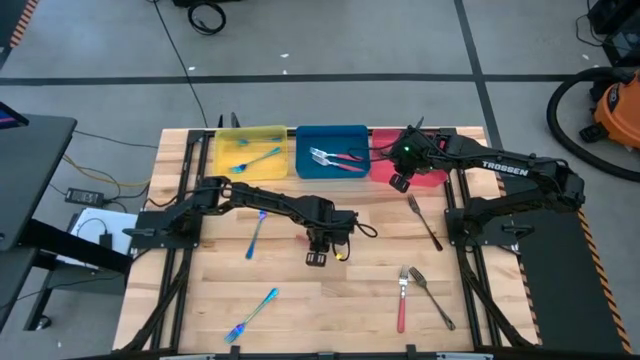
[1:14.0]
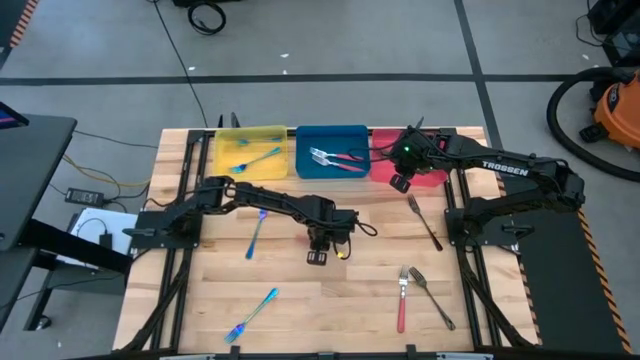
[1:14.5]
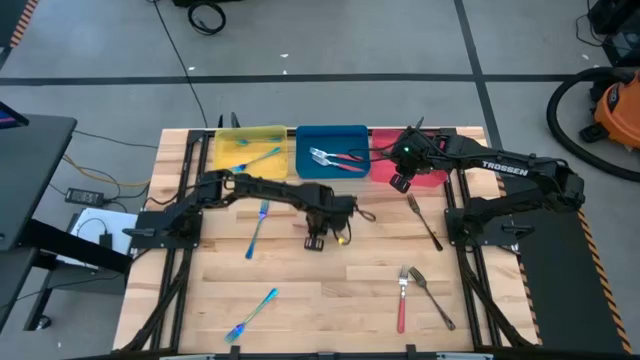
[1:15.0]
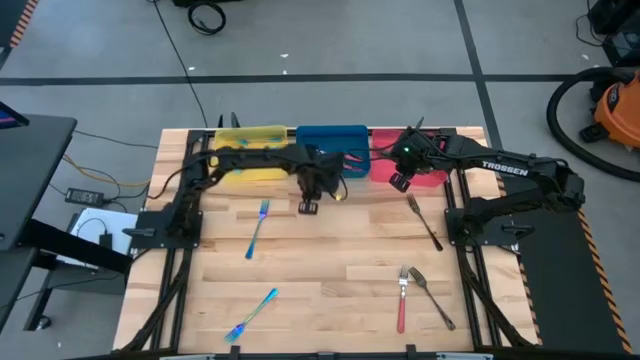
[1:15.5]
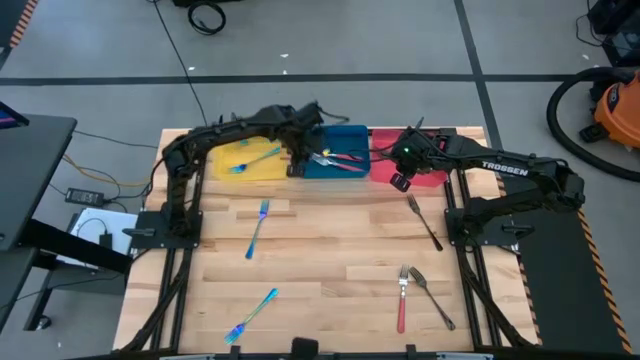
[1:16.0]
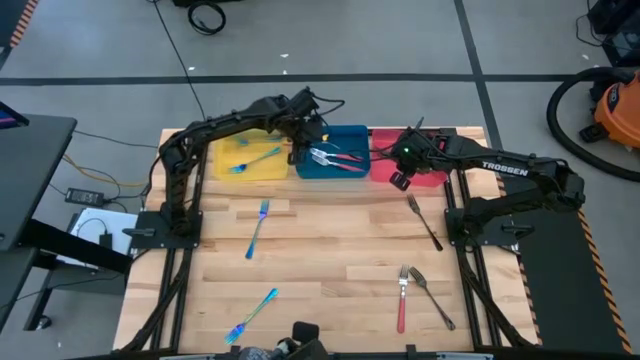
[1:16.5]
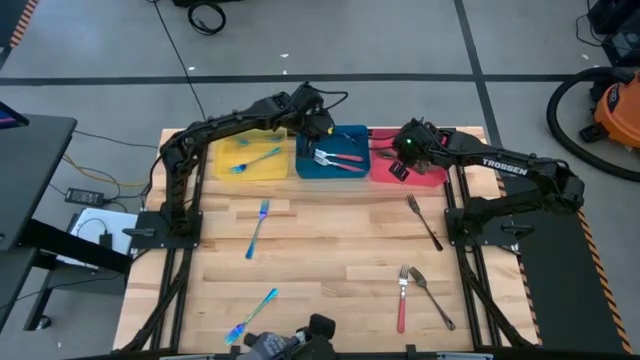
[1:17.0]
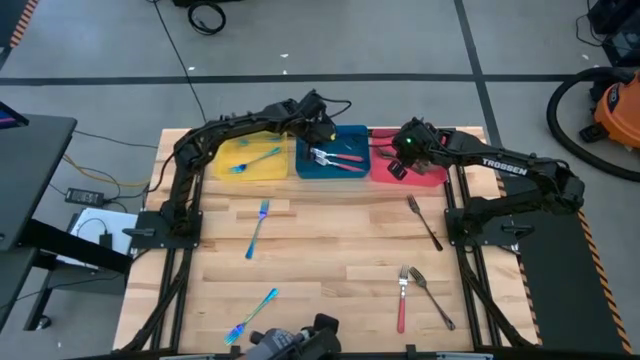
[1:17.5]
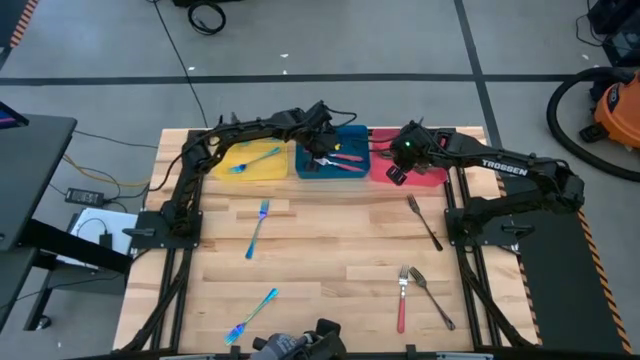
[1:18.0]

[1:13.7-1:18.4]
Task: Sort silverware by color (type)
Put the pink fork into the blue bin

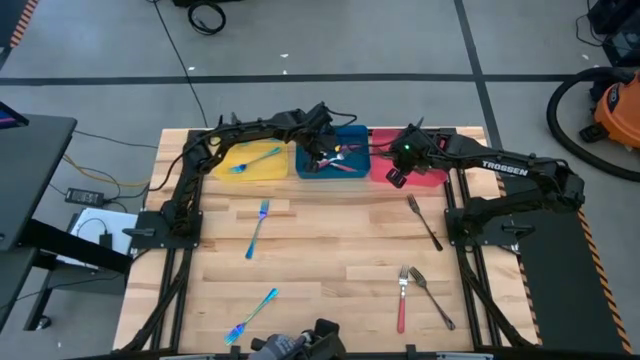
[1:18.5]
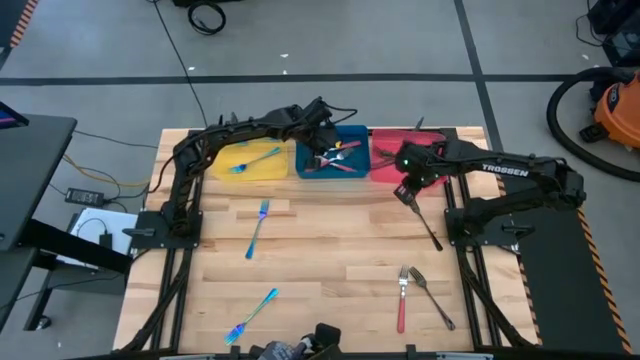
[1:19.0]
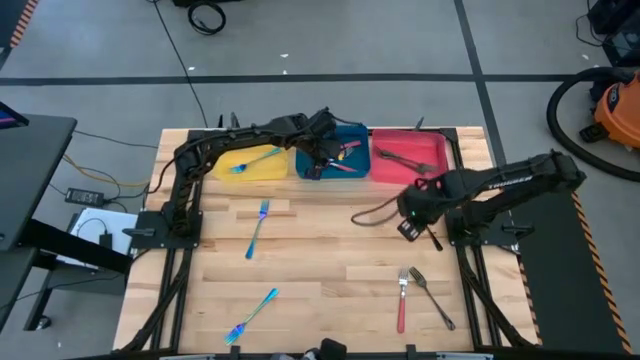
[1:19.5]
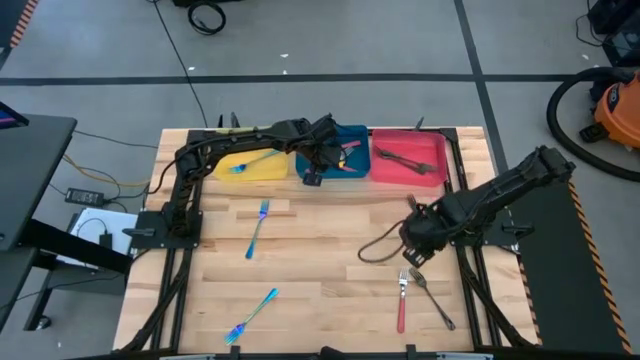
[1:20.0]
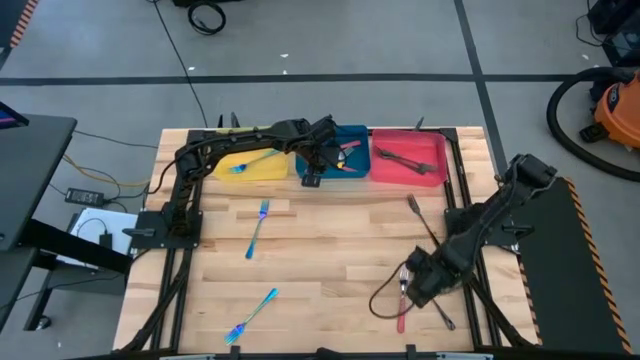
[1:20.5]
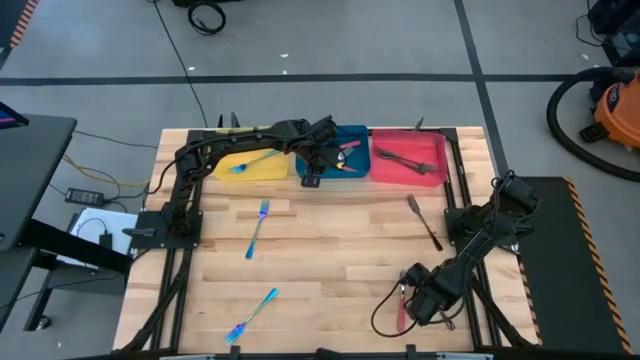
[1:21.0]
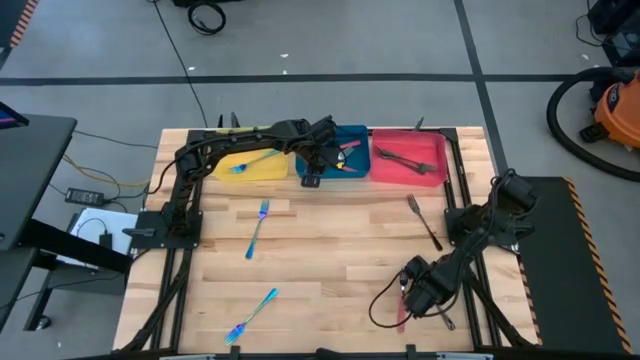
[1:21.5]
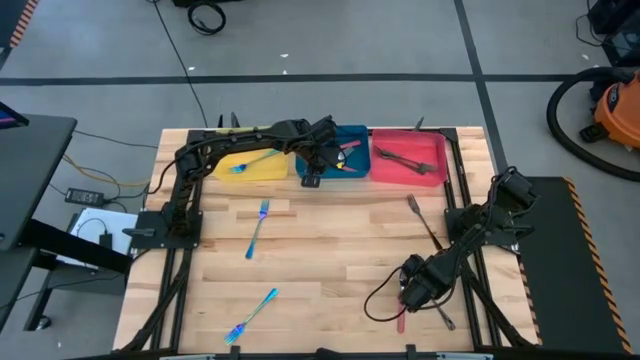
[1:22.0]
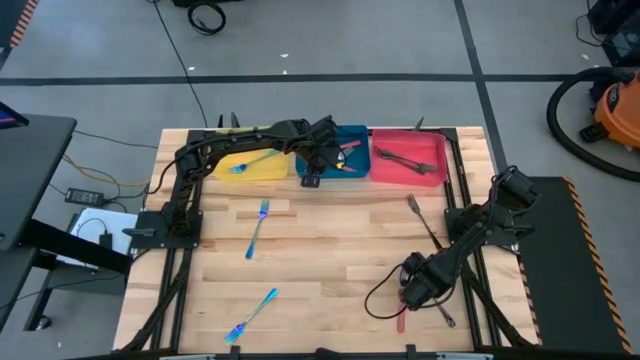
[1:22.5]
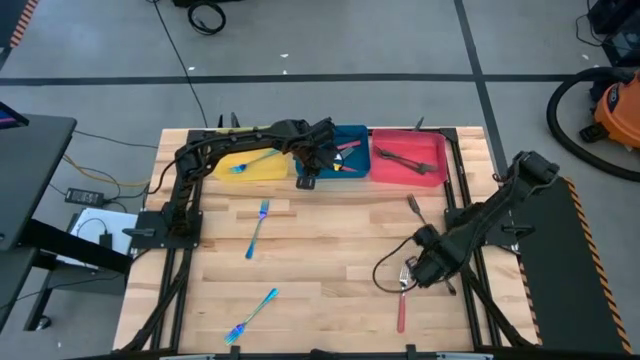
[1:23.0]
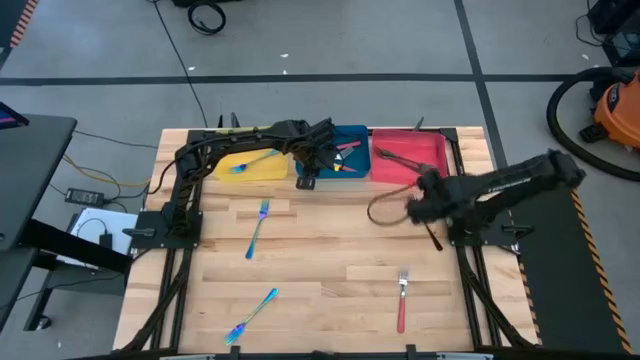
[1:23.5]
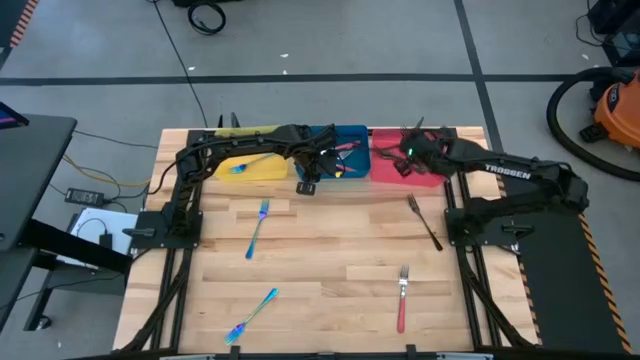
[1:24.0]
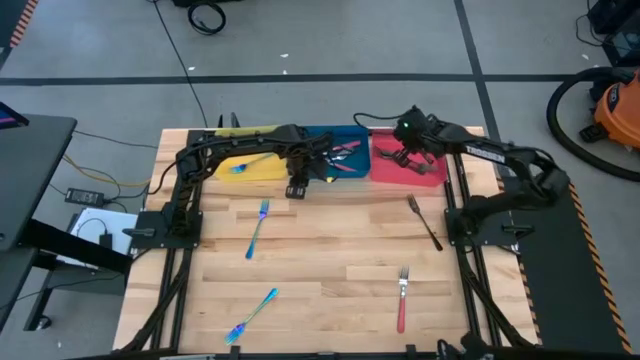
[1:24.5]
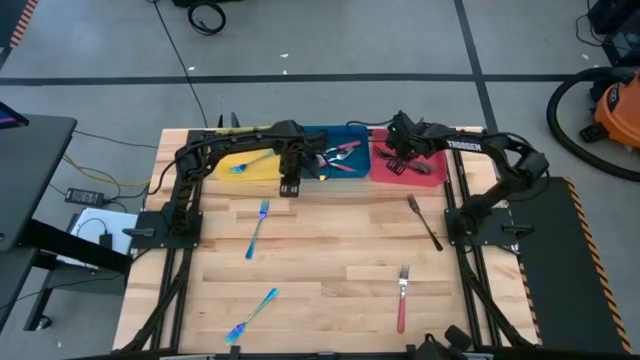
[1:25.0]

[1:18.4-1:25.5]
Put the black fork into the pink bin

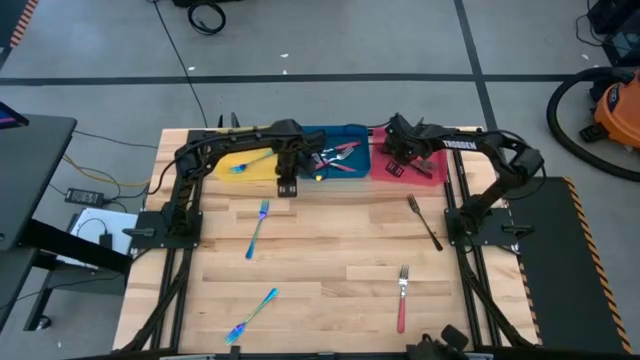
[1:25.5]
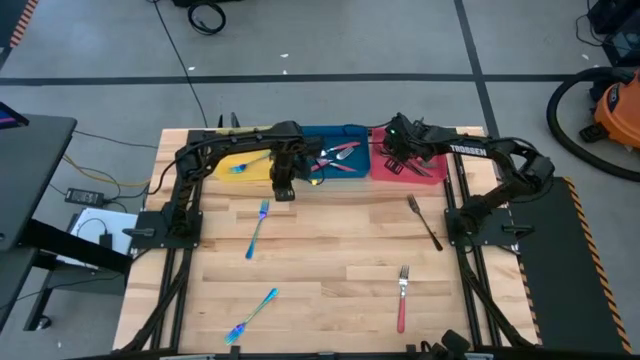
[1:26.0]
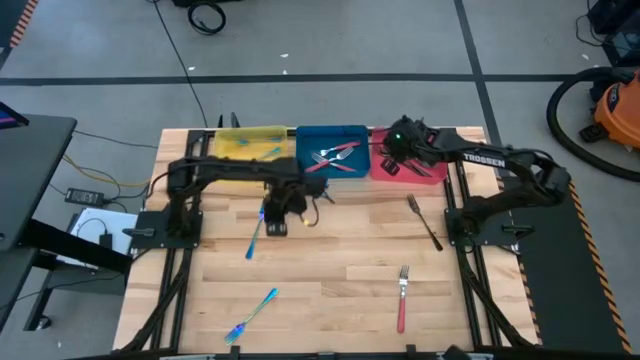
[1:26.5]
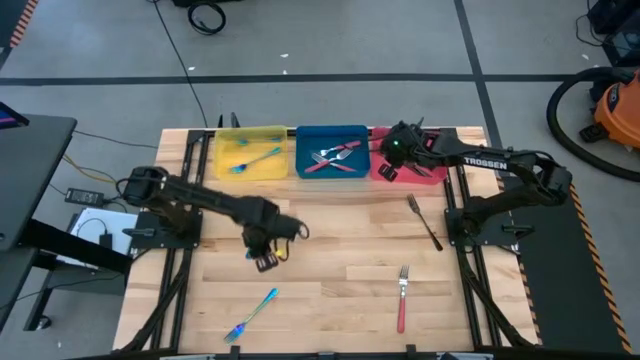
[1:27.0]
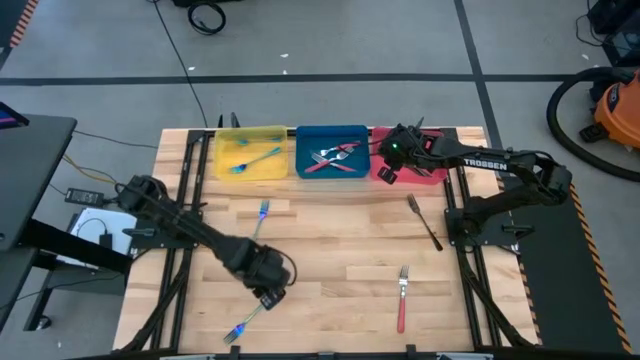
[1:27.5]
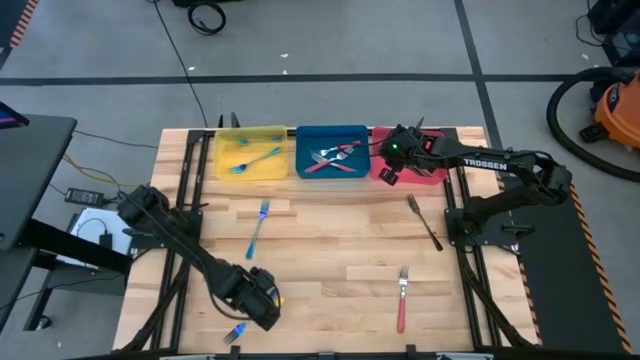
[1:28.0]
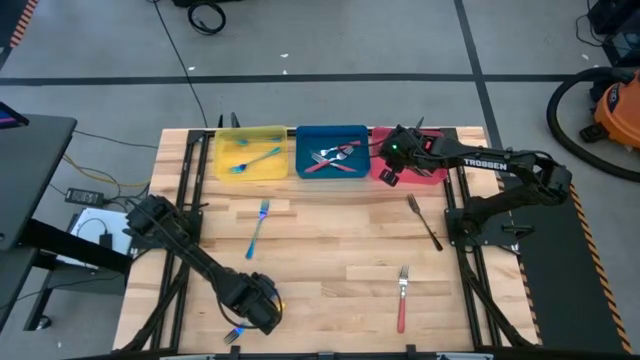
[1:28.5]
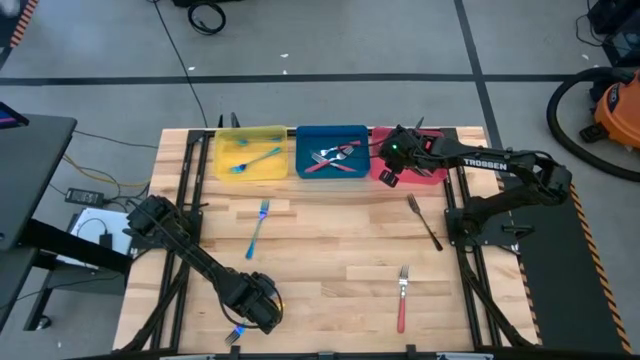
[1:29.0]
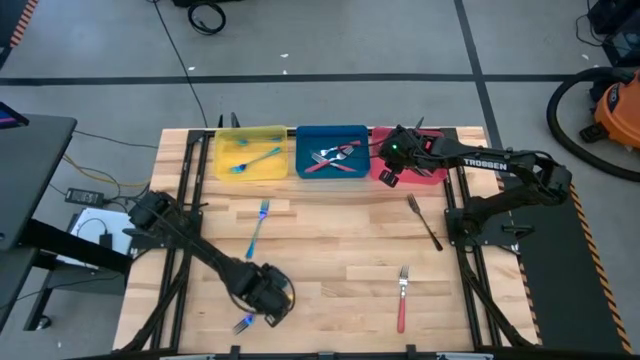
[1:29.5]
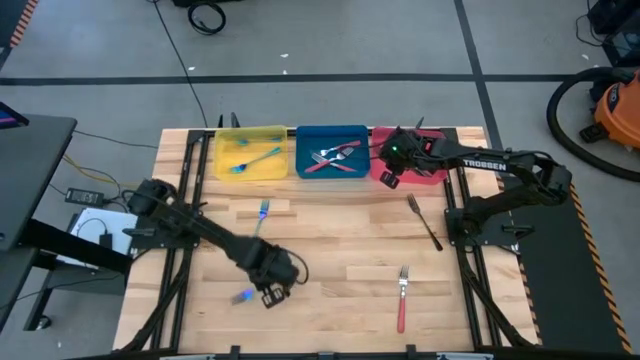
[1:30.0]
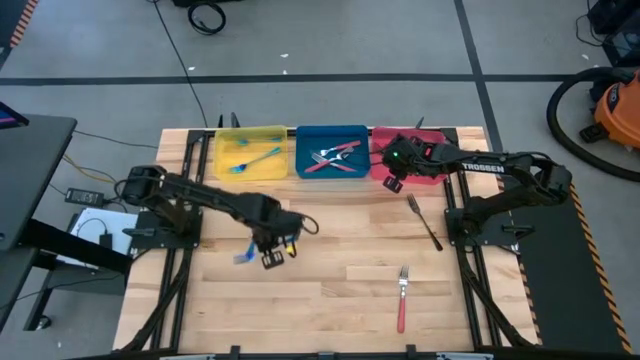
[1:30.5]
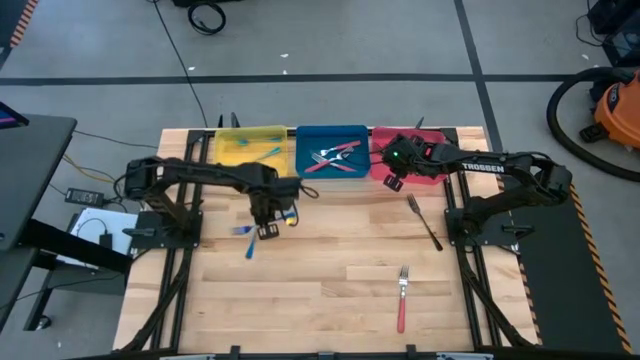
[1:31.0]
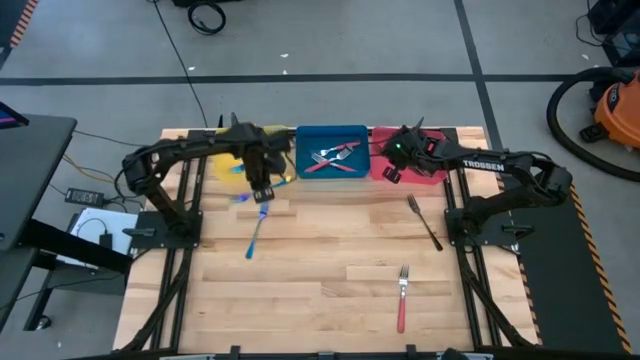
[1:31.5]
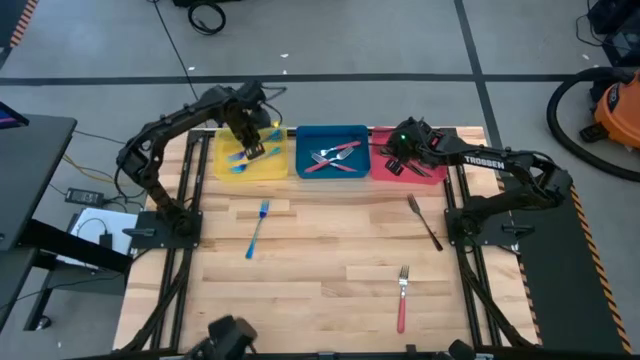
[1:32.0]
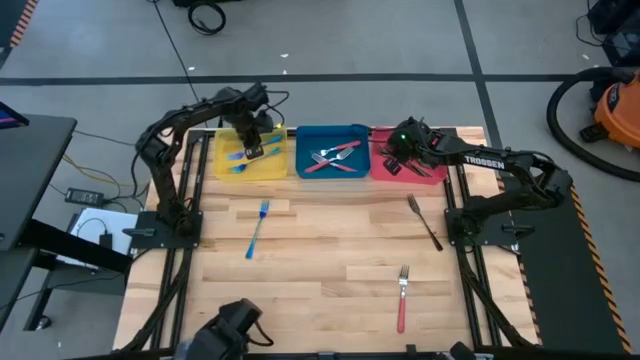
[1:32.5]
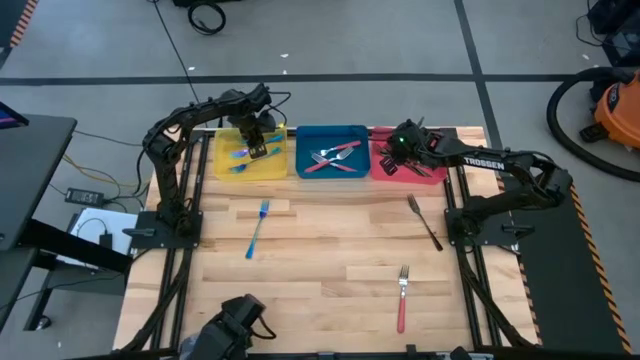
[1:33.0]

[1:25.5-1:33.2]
Put the blue fork into the yellow bin

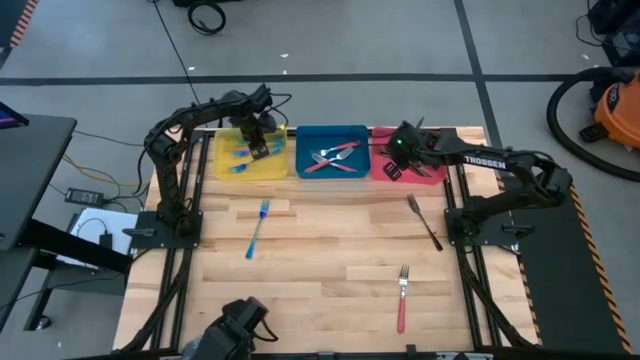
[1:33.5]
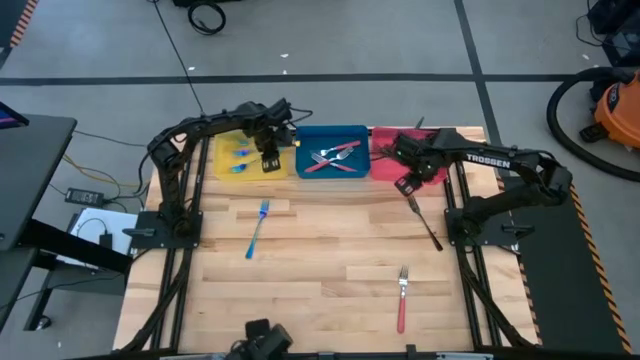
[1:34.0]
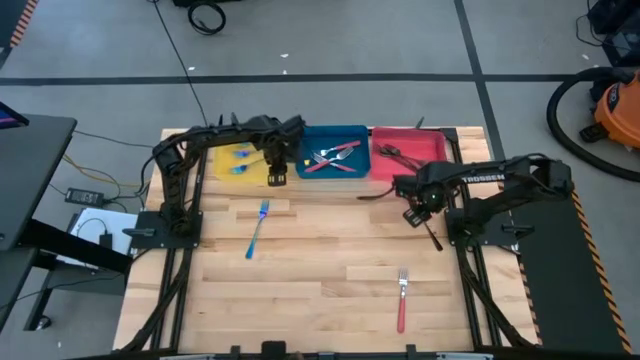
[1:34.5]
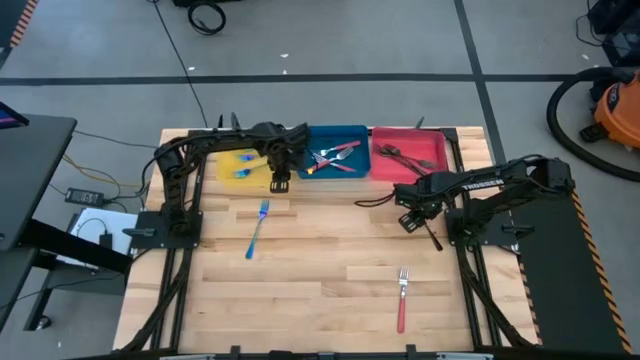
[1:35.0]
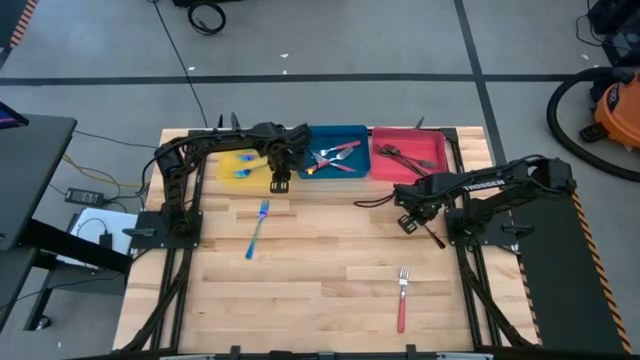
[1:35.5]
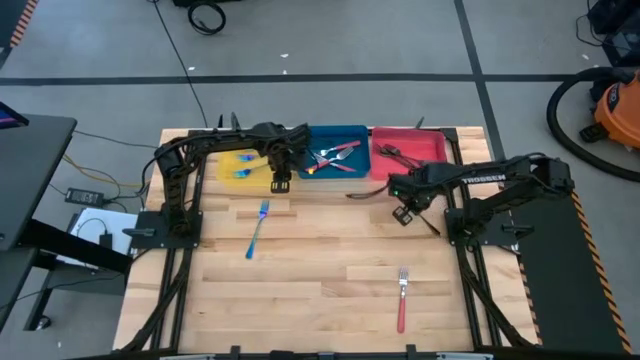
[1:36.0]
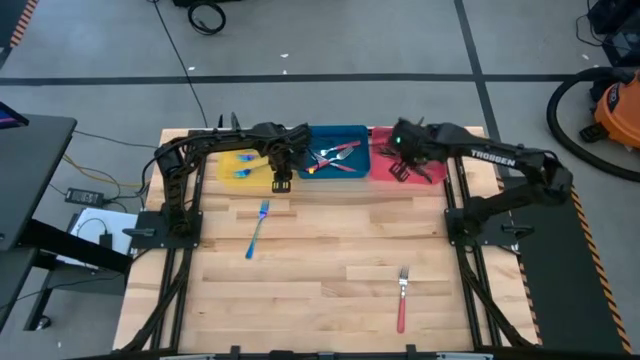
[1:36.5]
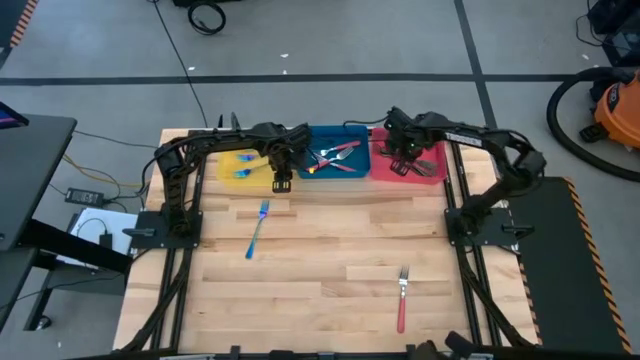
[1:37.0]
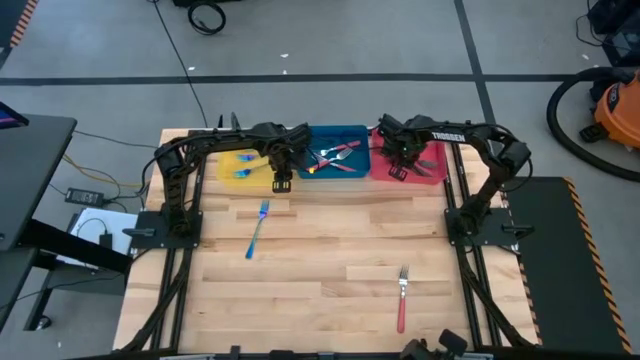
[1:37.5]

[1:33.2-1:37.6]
Put the black fork into the pink bin
